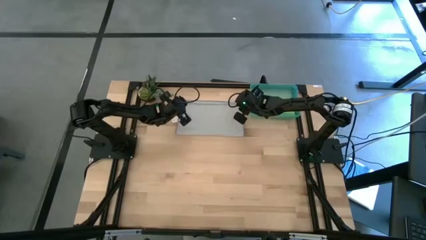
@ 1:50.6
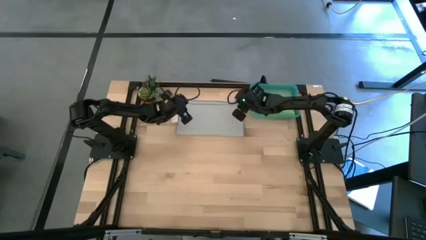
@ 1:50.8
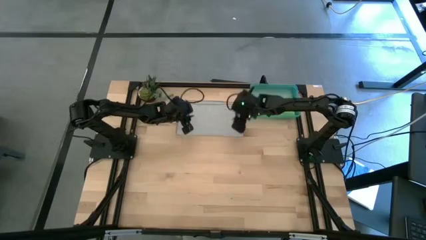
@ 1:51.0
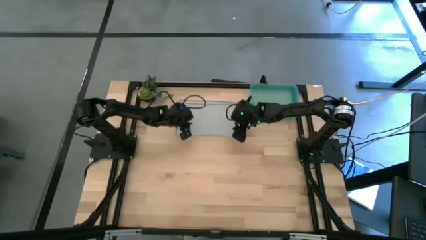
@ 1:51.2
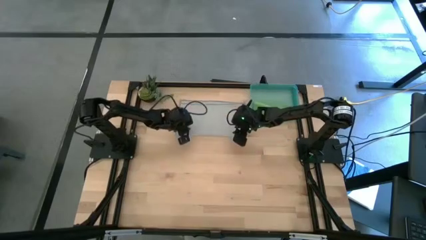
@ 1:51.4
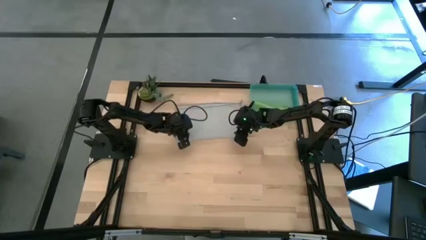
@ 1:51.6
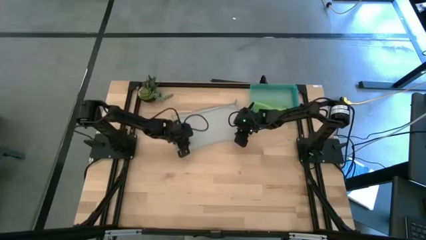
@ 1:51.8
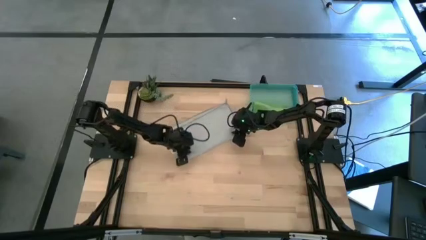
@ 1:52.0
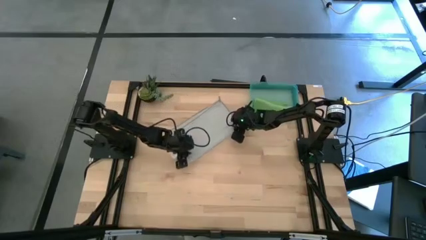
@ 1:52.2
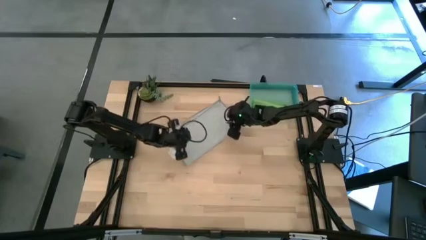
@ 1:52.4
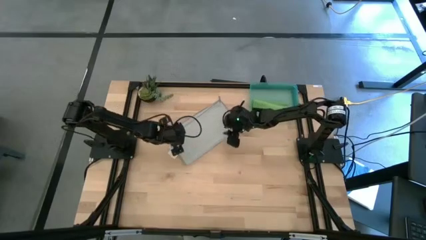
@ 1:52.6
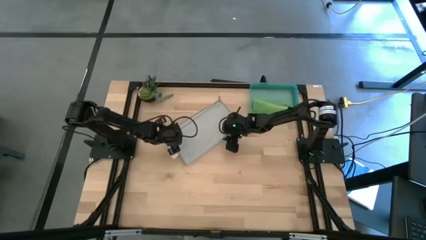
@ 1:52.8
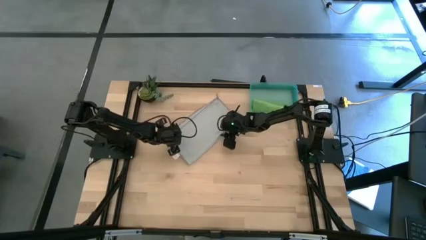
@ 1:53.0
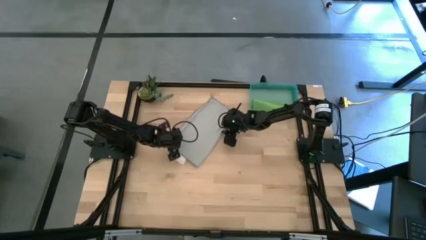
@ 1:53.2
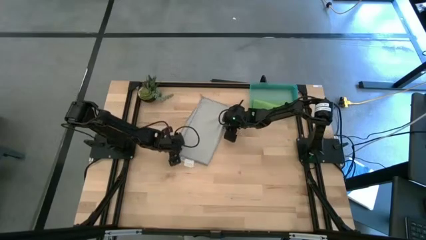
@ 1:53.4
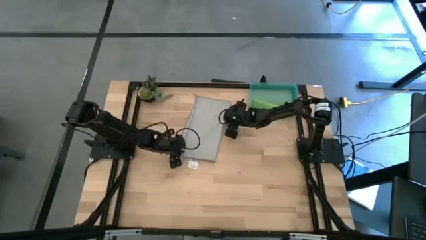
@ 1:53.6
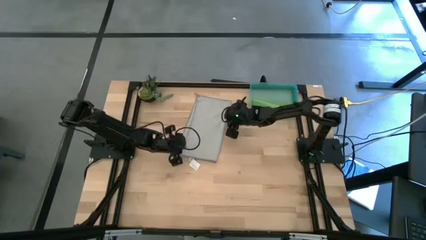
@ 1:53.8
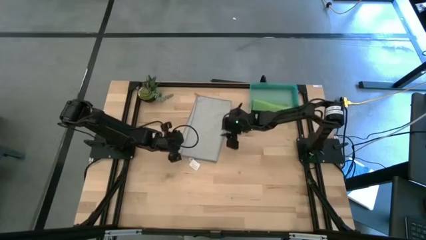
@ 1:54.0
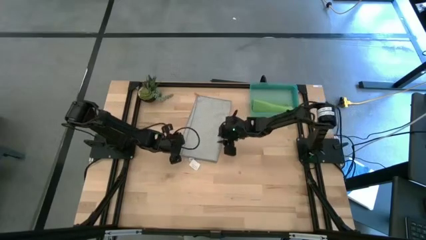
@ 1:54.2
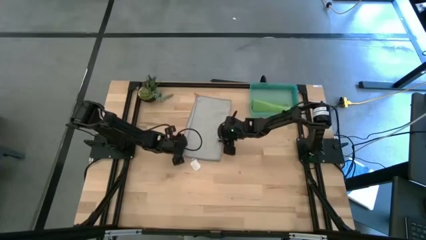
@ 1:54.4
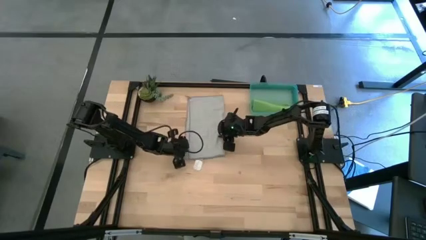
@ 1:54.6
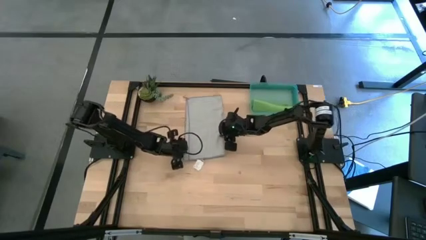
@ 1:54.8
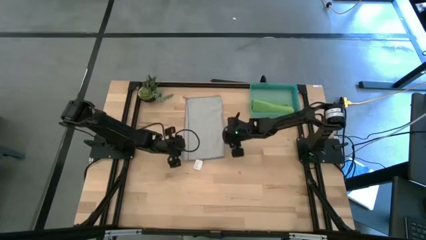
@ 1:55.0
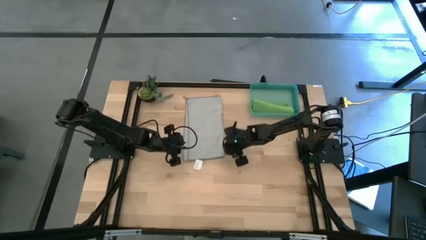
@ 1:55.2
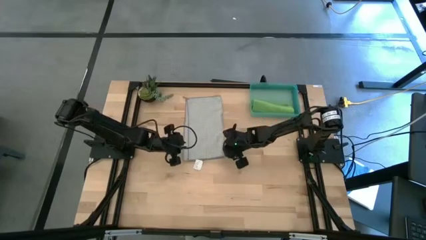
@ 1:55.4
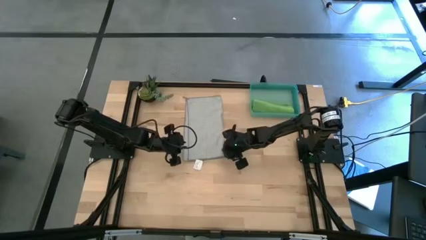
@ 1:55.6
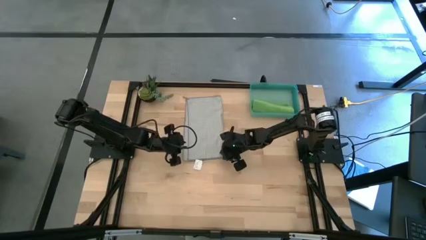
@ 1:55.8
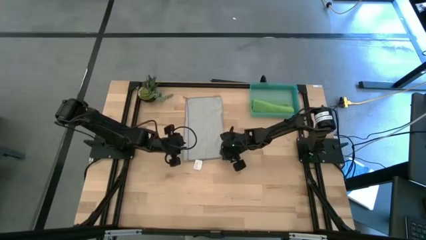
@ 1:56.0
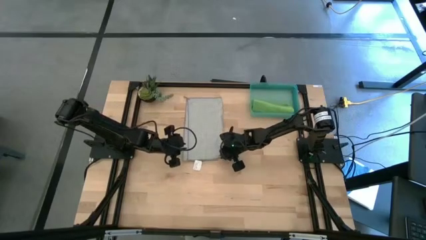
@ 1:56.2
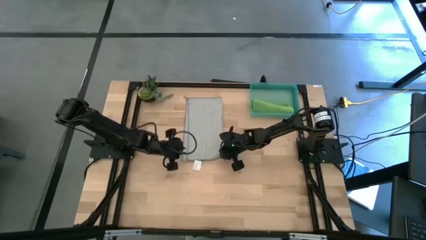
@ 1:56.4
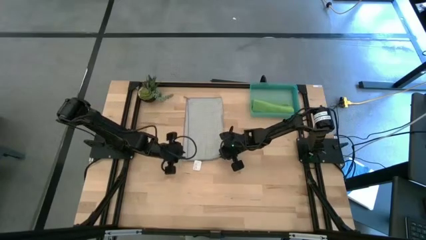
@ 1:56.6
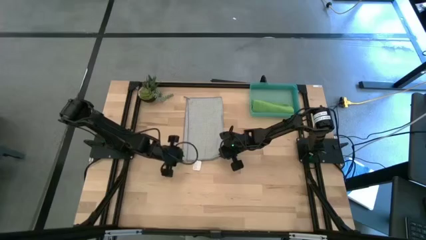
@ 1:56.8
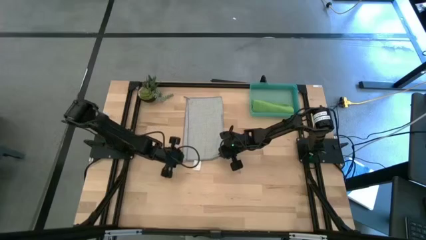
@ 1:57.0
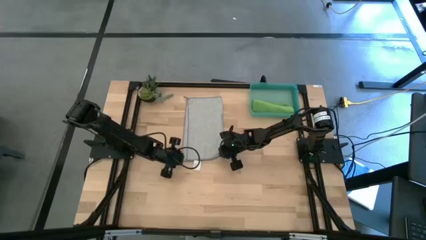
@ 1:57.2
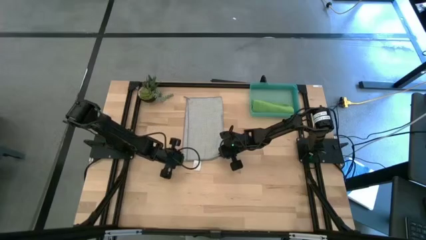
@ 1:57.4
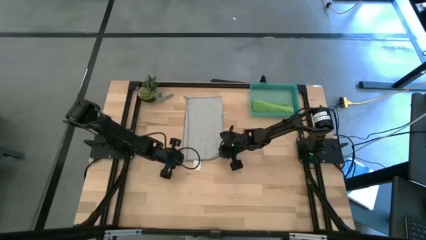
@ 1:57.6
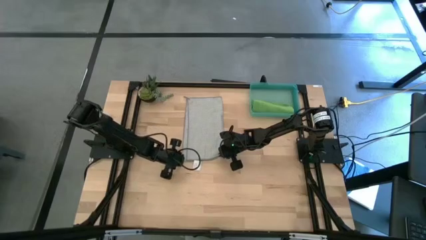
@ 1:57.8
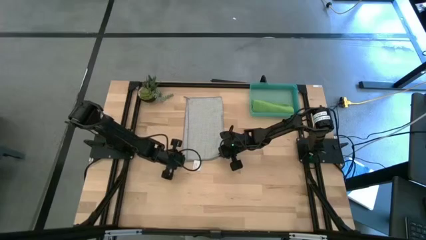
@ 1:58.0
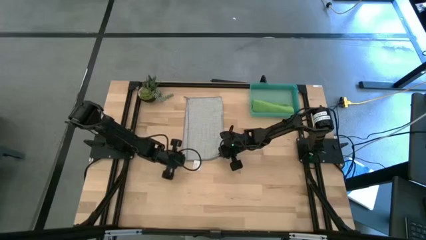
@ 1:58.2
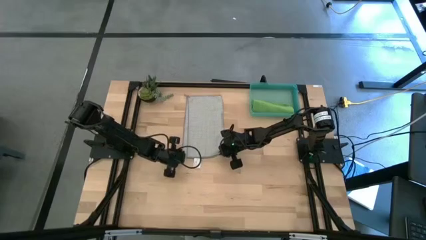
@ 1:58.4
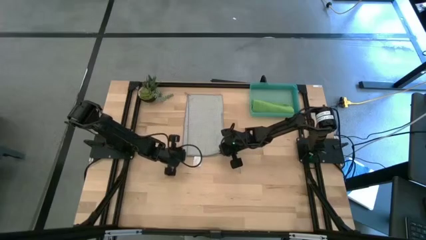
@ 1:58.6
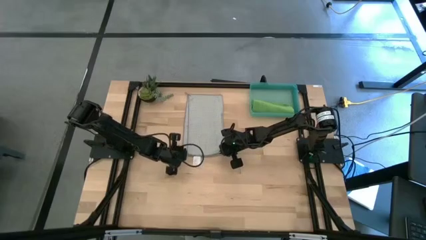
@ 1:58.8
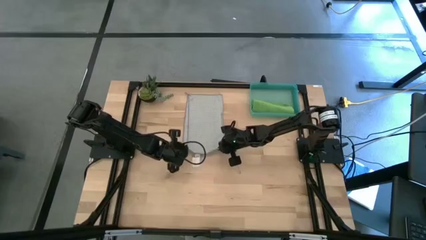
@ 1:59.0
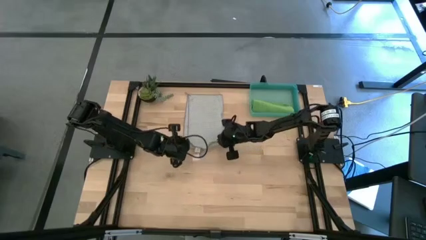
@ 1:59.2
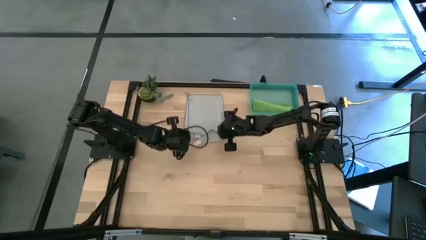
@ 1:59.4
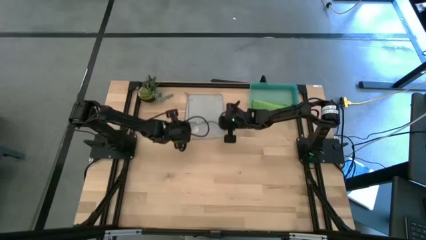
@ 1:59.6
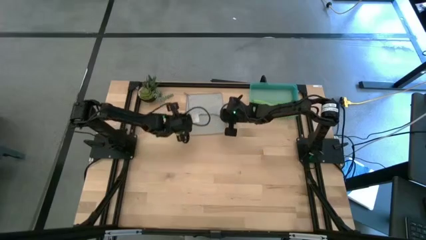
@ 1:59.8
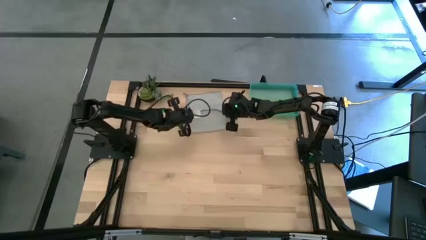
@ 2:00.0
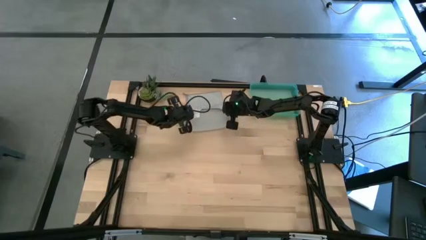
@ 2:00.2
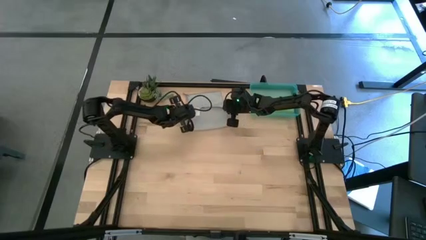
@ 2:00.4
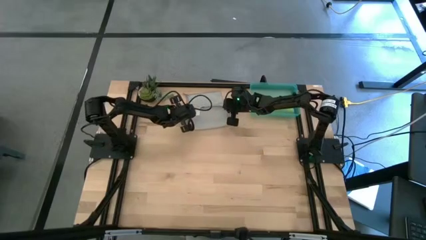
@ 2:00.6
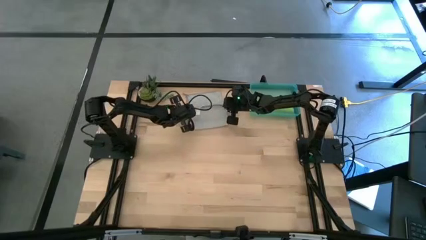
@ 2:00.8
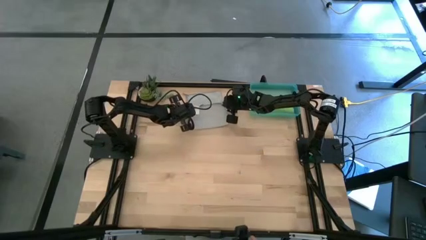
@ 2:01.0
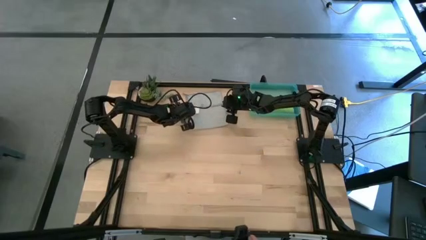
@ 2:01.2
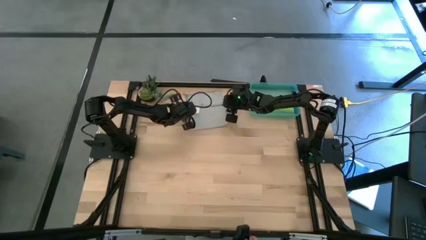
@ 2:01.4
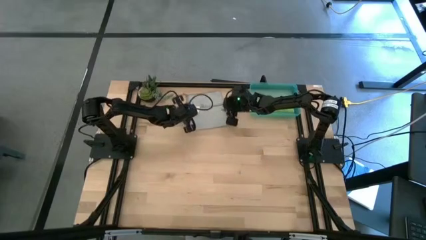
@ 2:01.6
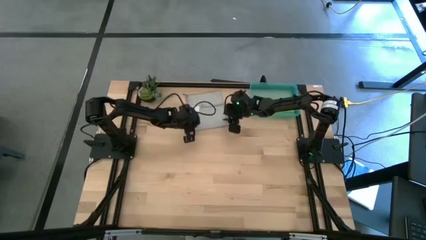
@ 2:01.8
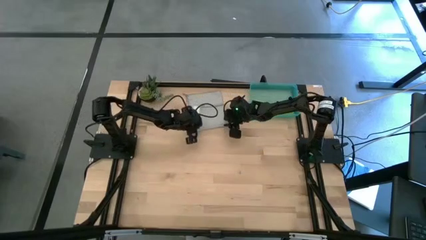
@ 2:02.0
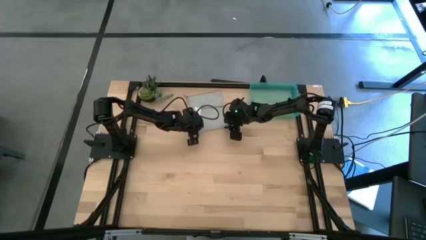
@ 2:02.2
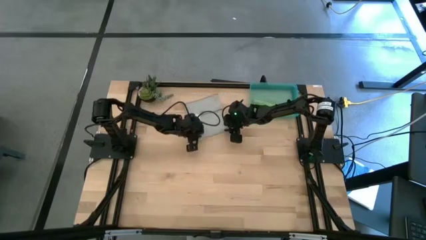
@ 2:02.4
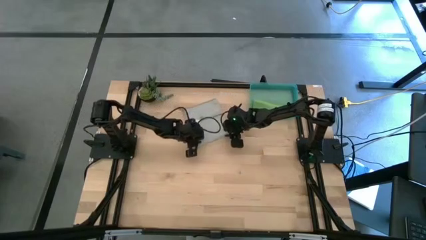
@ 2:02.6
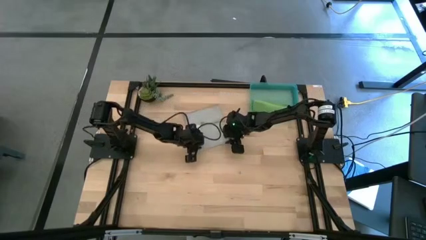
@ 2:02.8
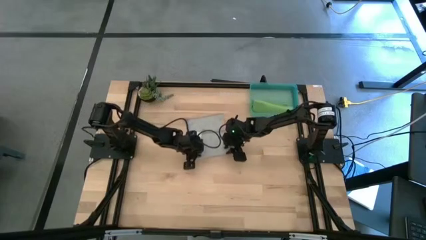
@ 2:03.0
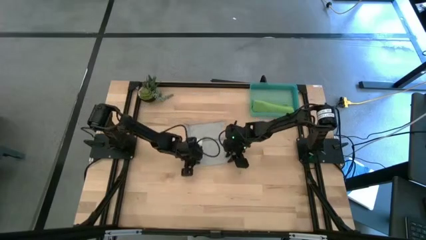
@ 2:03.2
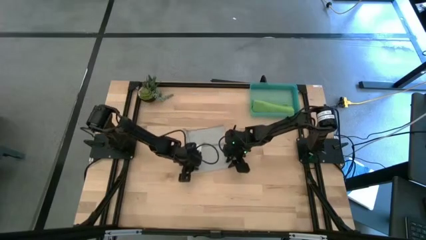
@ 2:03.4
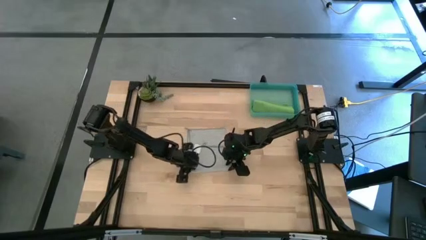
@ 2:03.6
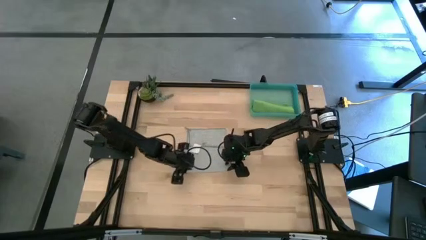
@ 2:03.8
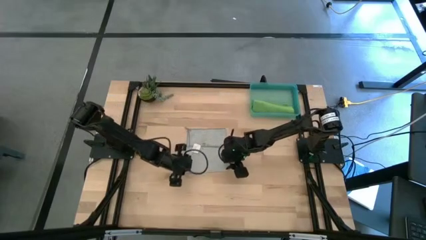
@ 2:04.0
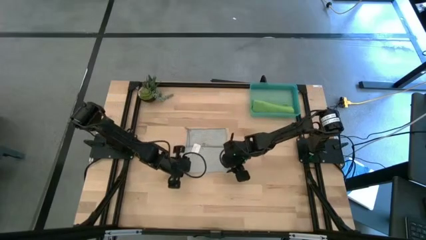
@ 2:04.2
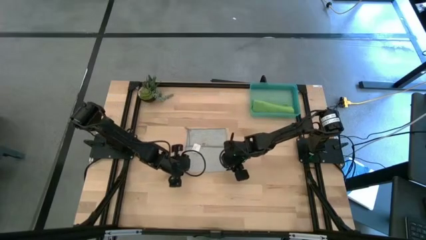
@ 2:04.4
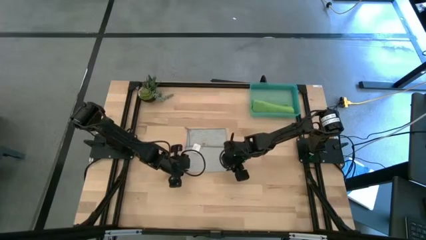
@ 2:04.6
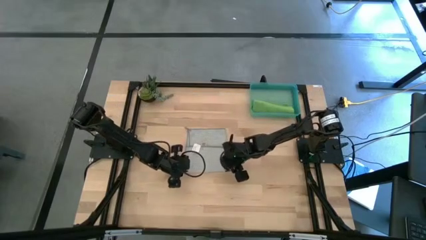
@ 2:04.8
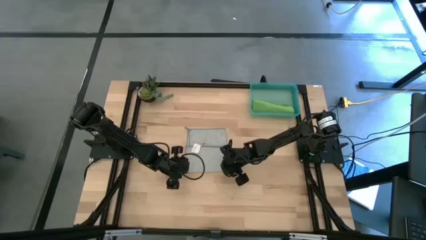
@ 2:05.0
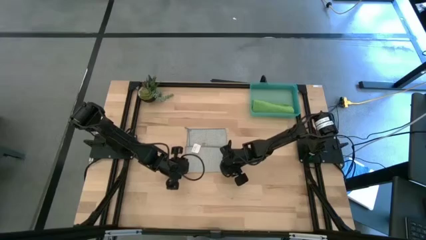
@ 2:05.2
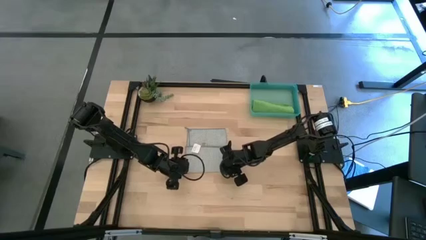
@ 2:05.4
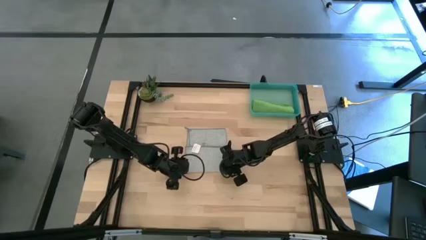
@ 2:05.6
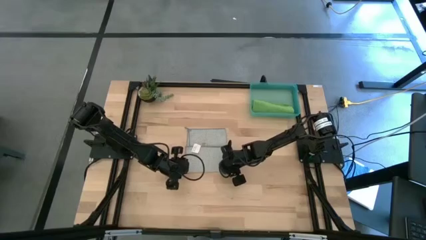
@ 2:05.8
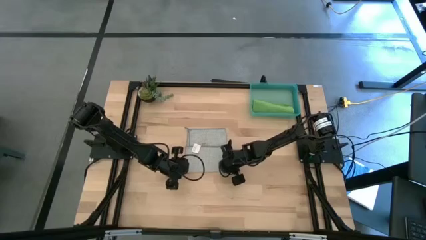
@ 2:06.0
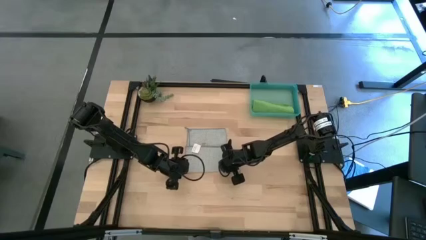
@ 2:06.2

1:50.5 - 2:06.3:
Task: Roll microfiber towels into tight, uniform cylinder then place into a basket
Roll the gray microfiber cloth
